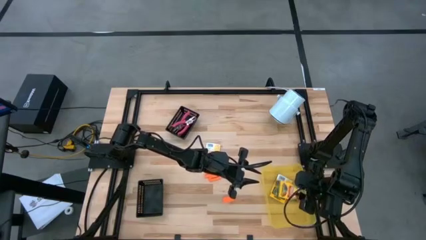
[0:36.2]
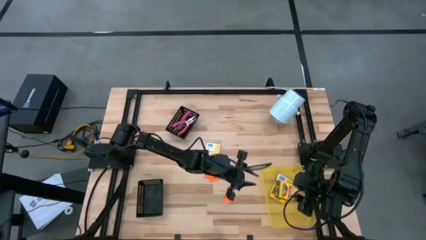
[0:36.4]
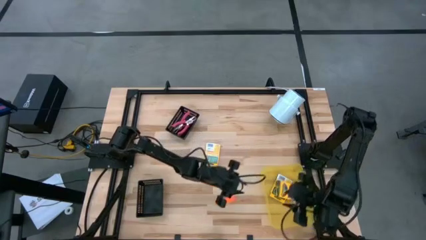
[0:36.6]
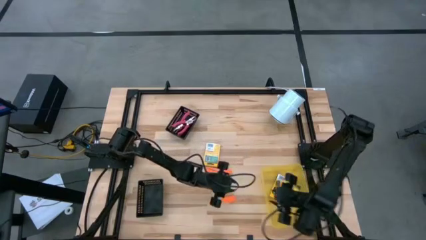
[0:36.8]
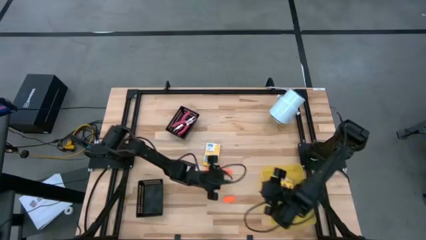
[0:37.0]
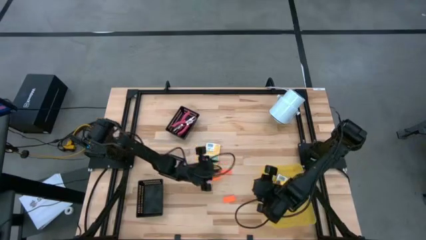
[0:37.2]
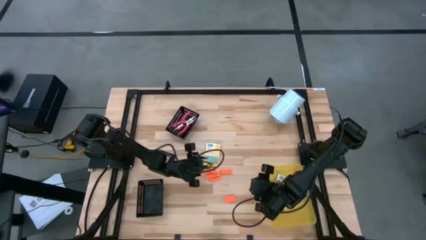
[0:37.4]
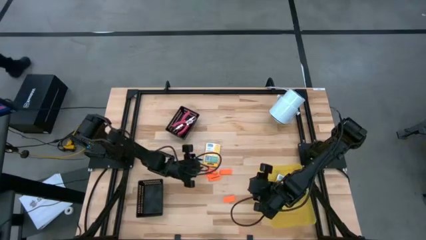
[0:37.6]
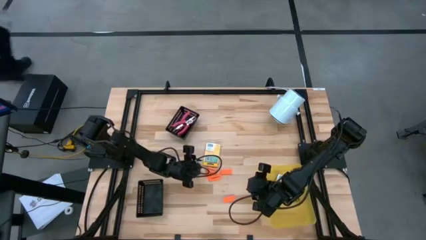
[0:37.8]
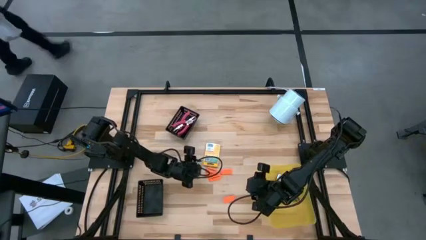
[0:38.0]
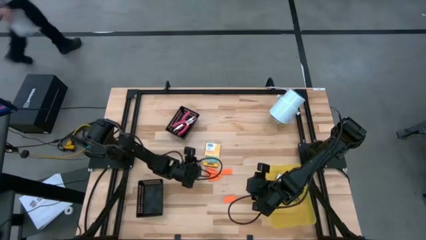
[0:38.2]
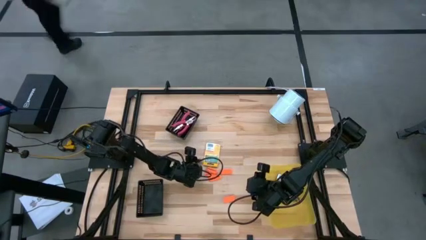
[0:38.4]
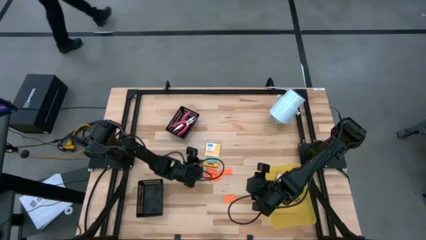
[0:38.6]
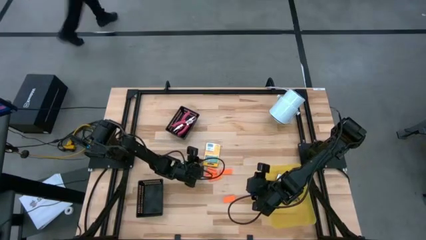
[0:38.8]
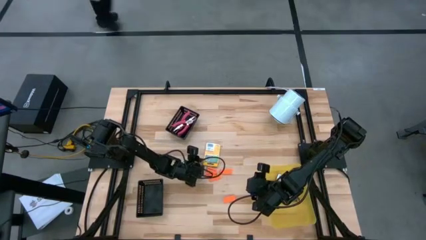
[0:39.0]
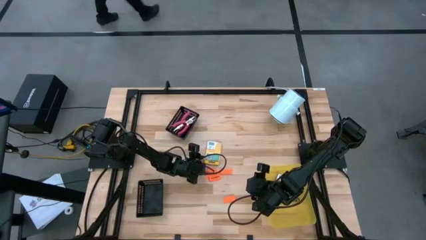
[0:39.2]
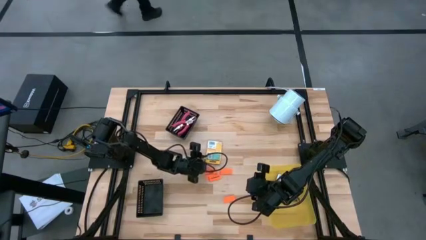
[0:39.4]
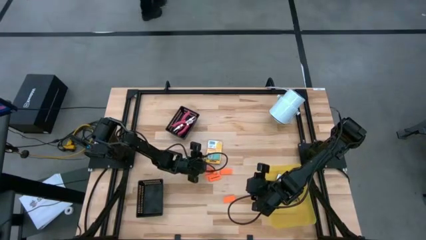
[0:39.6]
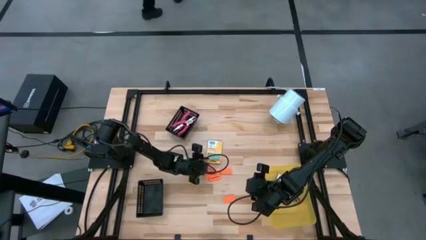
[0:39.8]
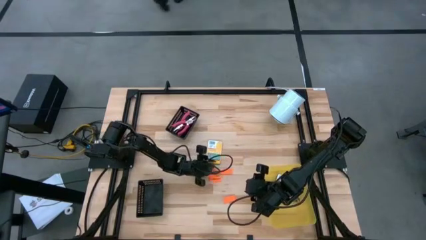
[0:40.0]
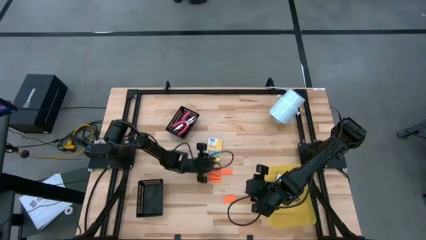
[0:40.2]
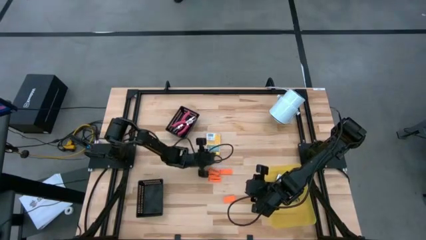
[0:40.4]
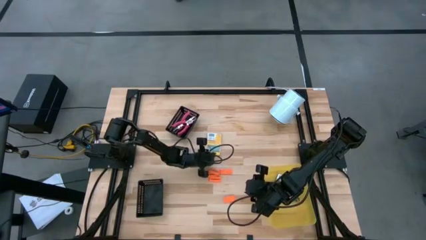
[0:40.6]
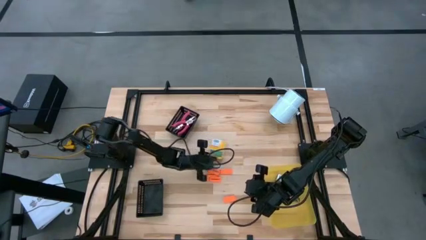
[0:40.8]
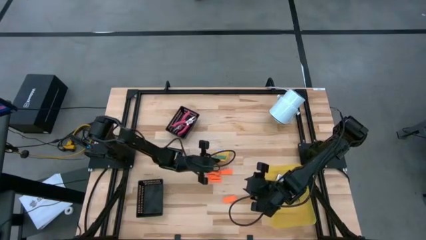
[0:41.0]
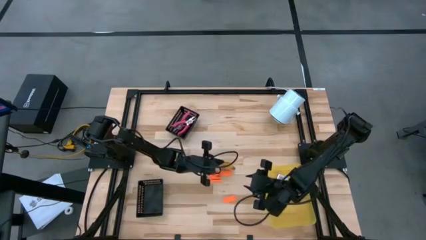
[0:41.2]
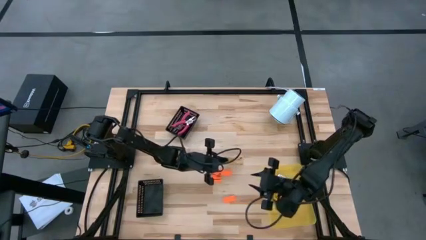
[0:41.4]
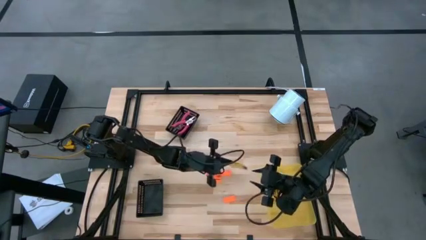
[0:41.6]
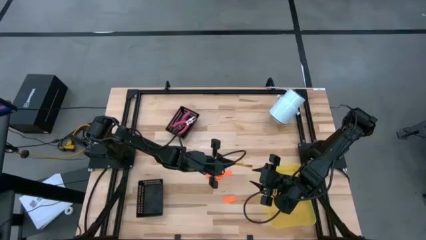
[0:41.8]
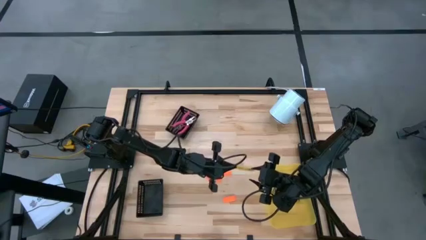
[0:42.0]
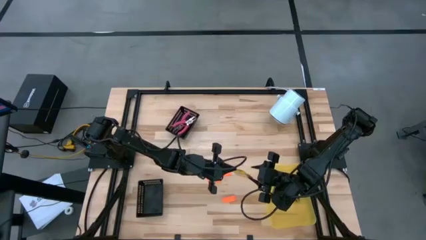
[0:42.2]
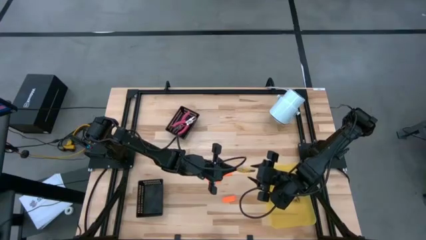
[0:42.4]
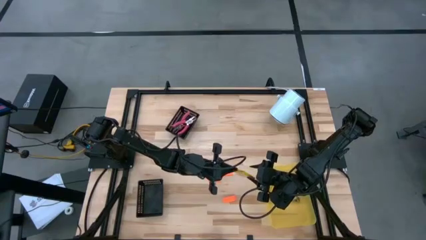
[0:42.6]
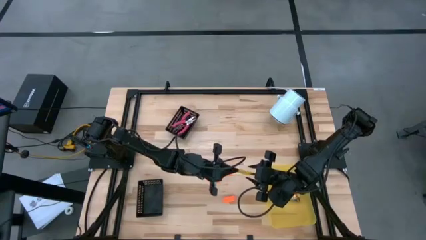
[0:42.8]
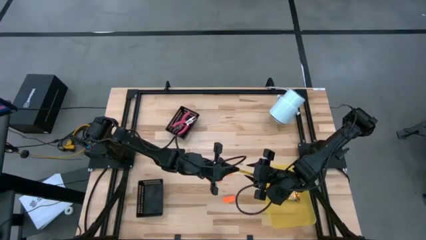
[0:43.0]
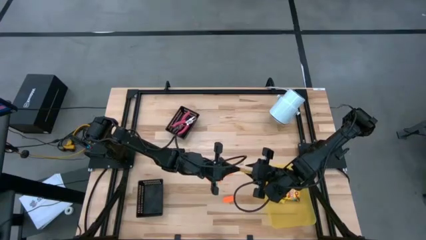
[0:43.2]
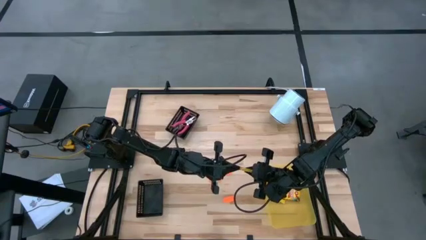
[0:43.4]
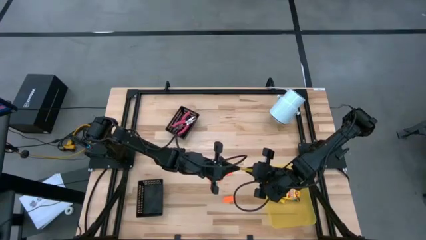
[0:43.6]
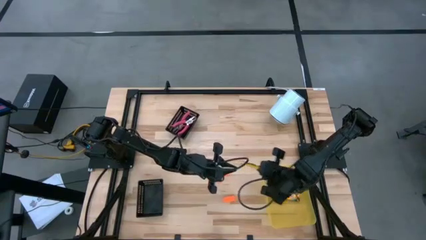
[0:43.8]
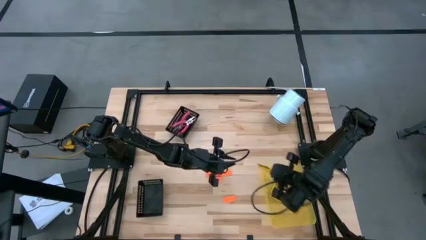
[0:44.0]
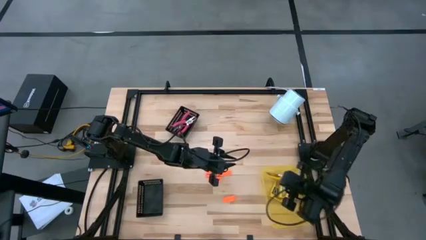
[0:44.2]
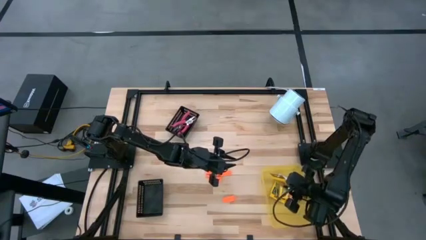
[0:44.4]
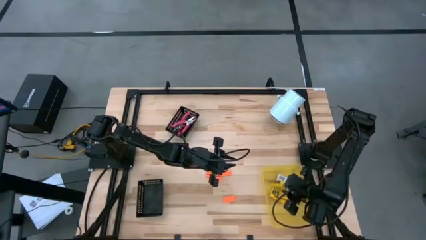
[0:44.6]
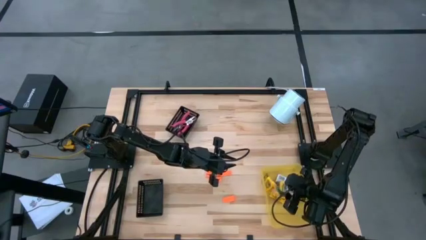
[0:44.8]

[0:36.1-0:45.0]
Task: Pick & Place School Supplies
Put the yellow crayon box into the yellow basket

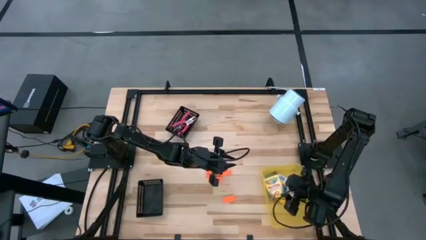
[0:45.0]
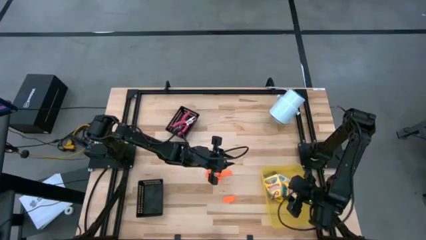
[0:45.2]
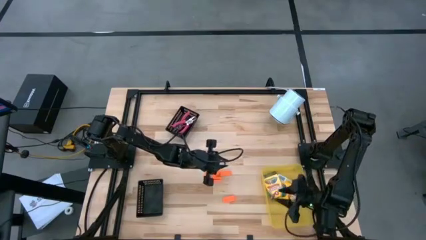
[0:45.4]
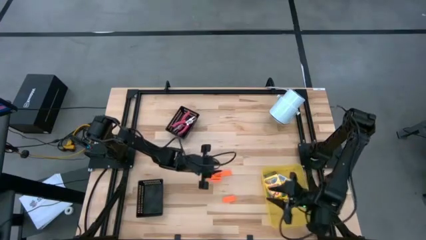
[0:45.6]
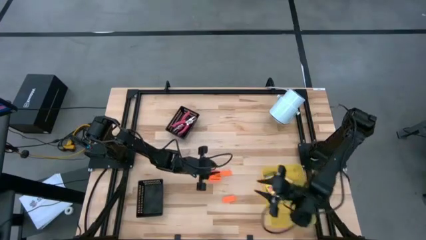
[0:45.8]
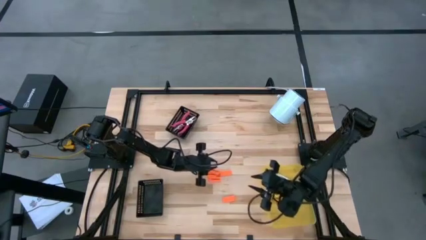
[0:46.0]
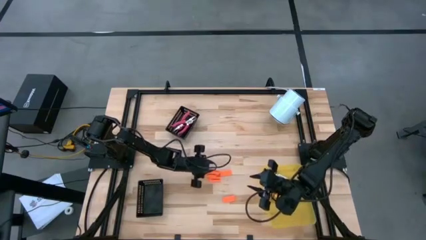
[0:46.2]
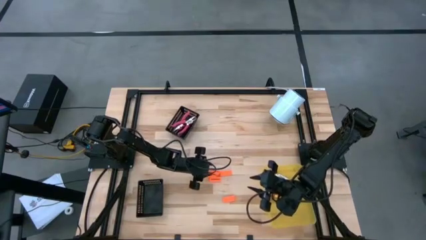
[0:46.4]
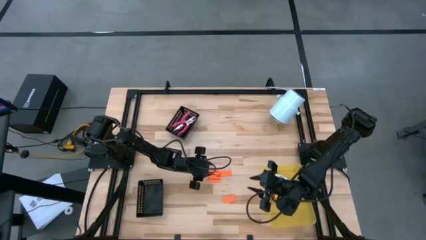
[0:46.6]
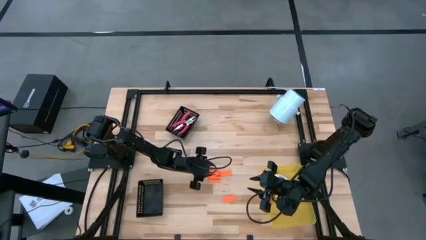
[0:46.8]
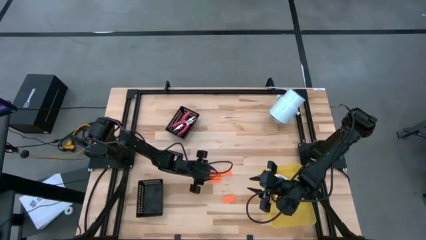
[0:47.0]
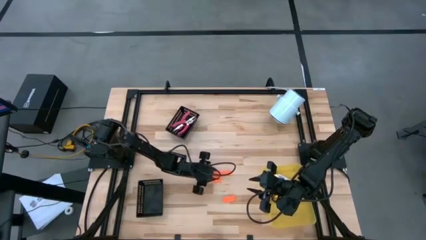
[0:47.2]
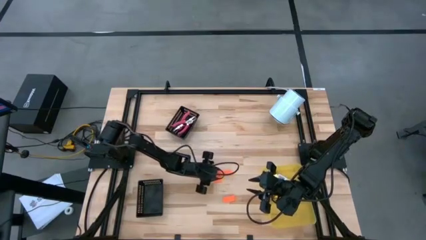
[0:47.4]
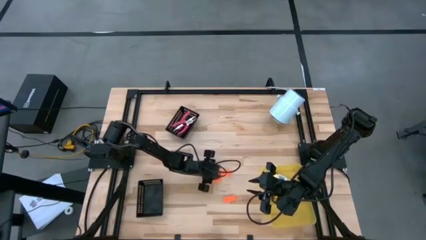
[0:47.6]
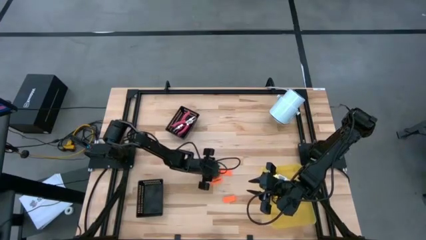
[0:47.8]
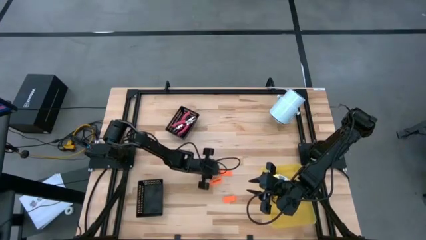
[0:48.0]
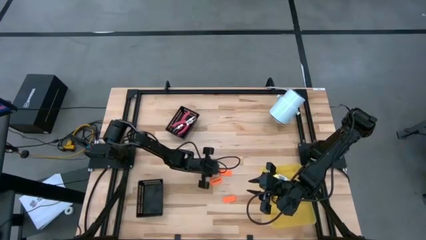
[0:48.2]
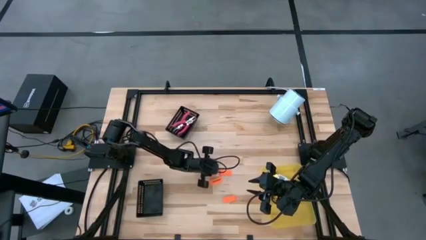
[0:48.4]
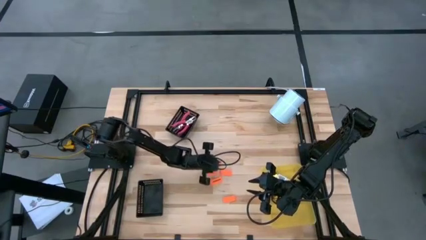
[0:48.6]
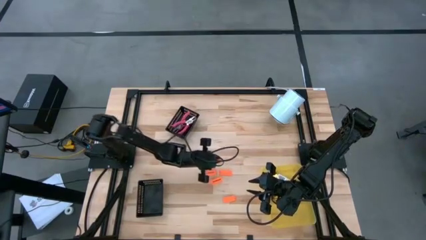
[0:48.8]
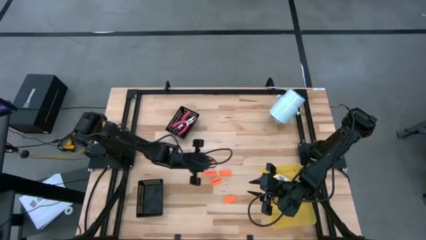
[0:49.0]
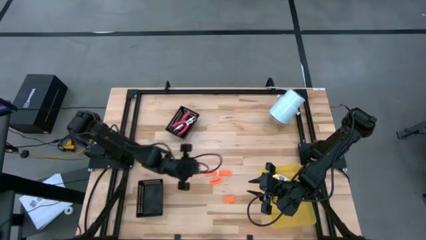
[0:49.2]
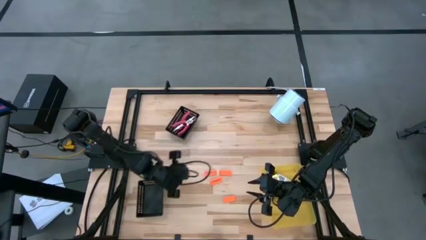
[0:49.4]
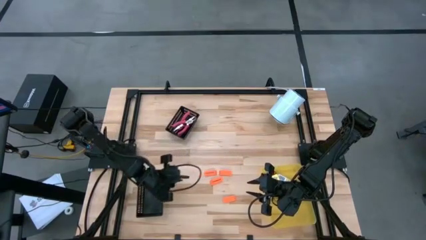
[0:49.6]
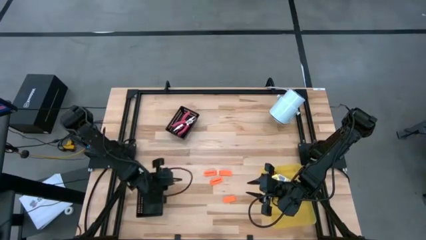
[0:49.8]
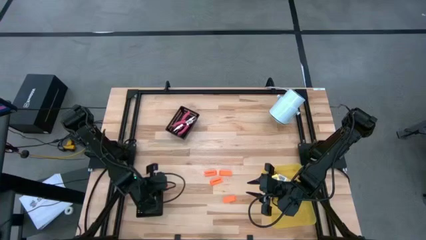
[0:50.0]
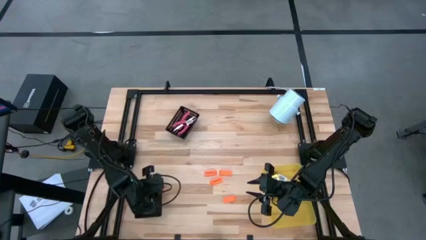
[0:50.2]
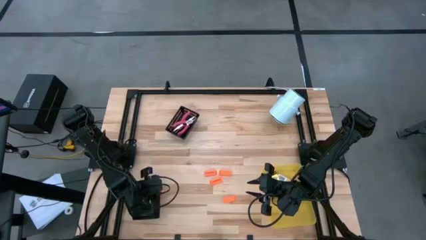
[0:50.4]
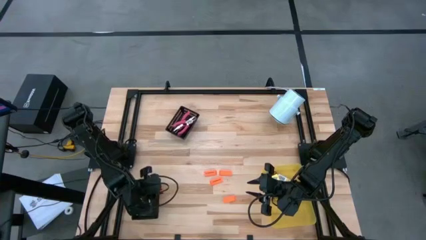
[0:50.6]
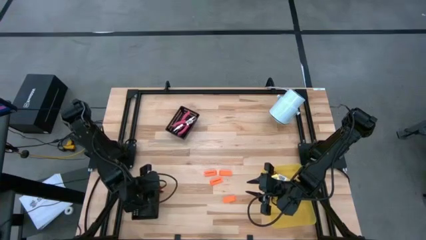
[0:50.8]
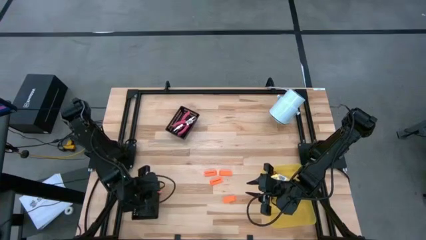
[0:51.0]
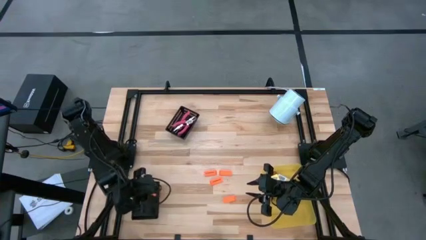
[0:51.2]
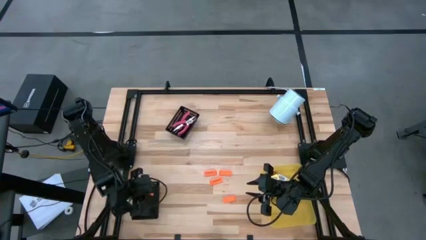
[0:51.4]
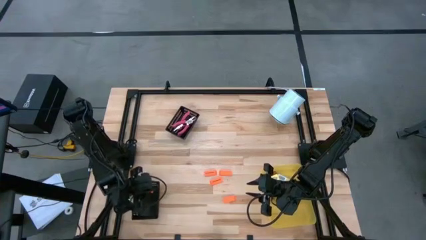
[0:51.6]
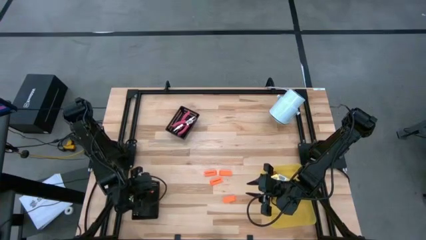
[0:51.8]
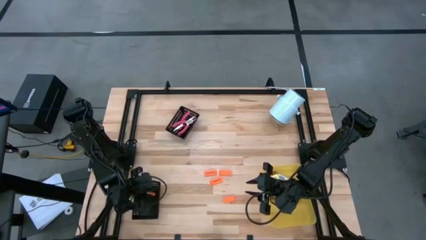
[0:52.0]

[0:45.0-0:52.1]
Put the orange eraser into the bottom black basket
